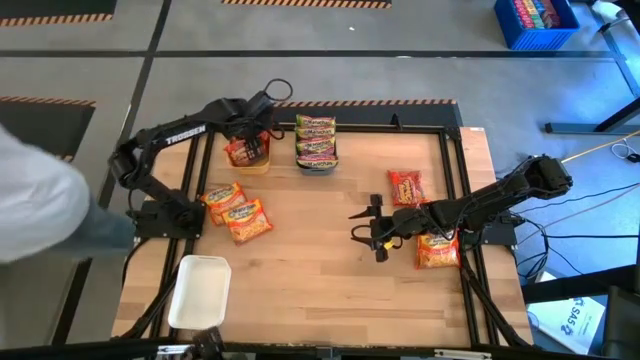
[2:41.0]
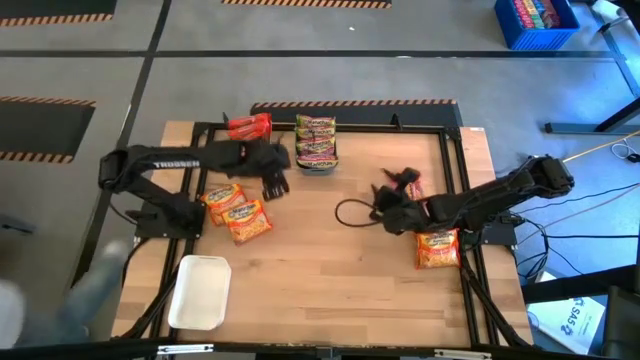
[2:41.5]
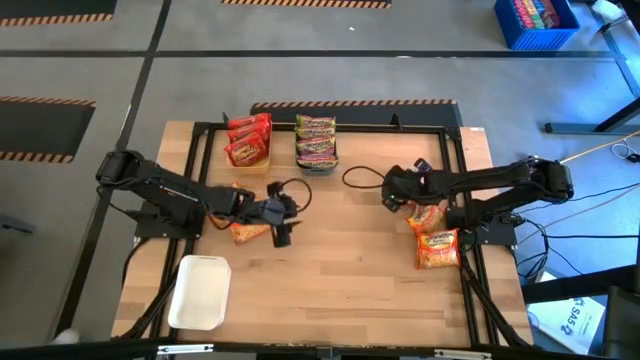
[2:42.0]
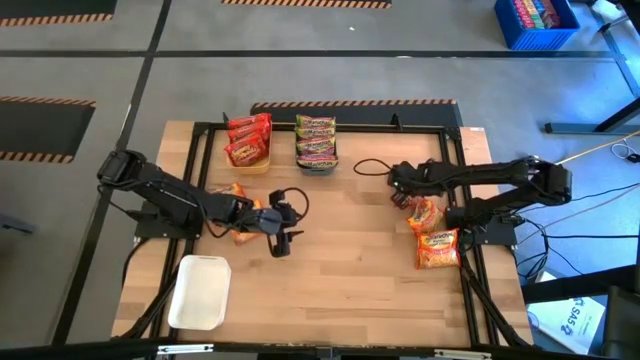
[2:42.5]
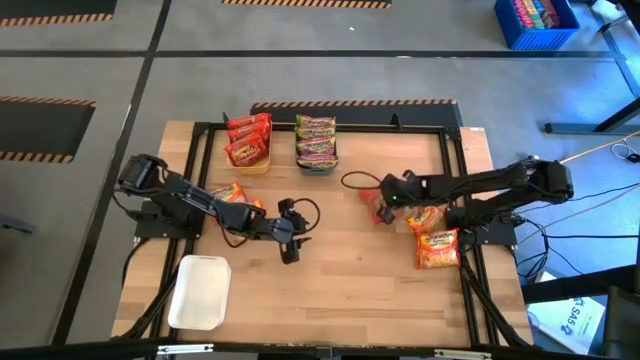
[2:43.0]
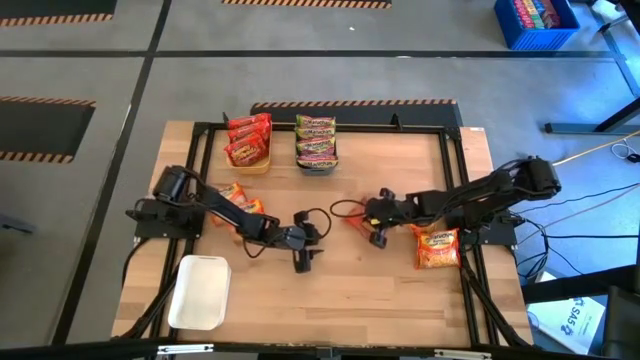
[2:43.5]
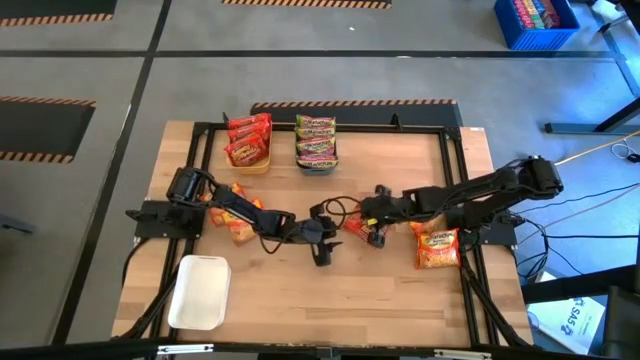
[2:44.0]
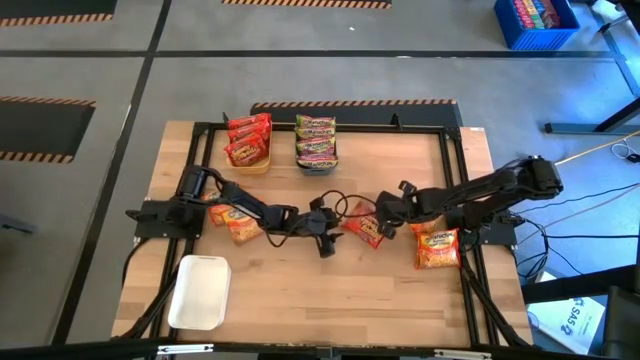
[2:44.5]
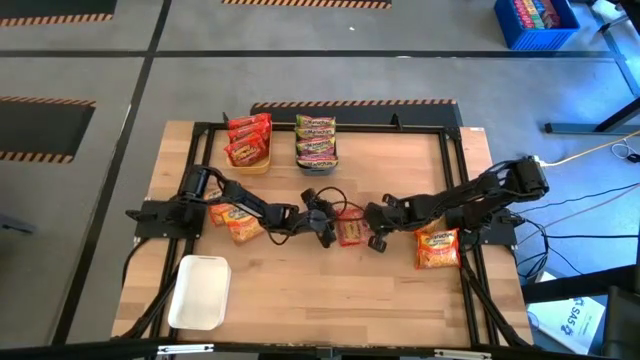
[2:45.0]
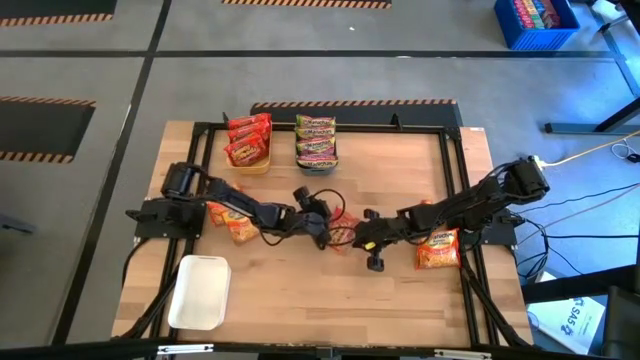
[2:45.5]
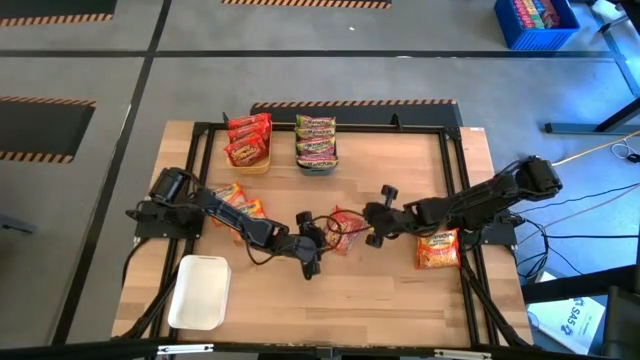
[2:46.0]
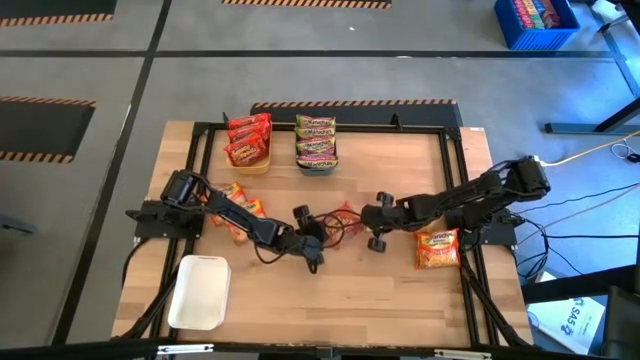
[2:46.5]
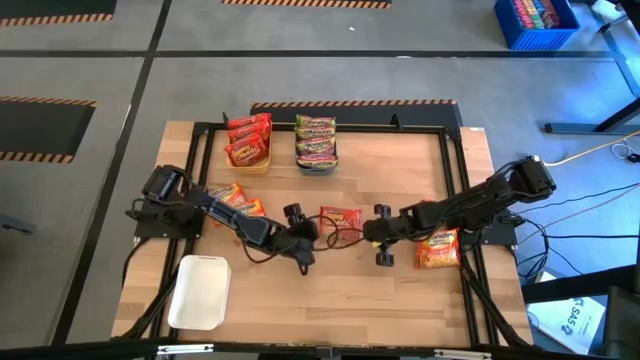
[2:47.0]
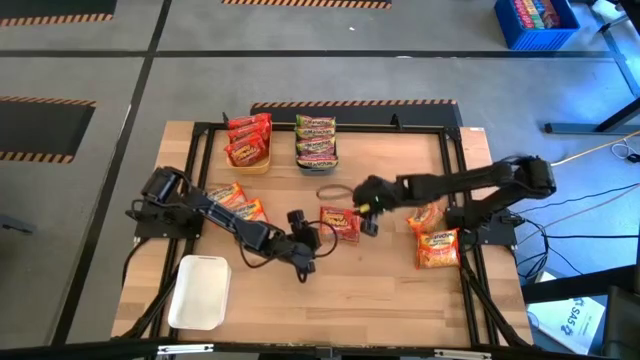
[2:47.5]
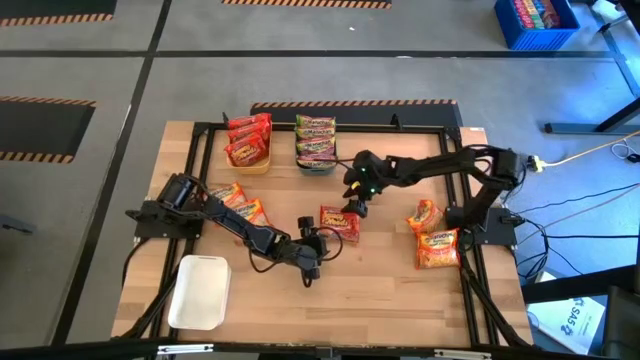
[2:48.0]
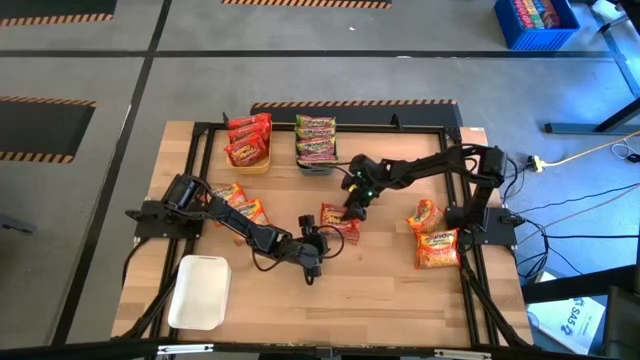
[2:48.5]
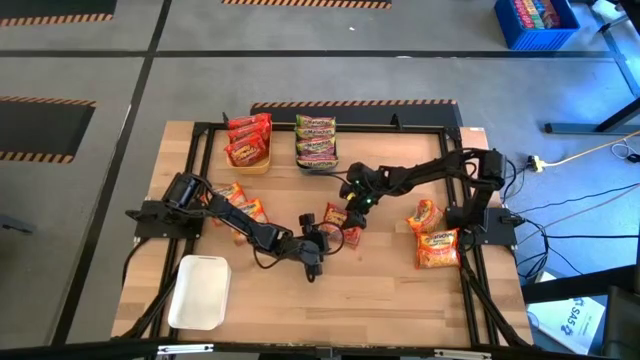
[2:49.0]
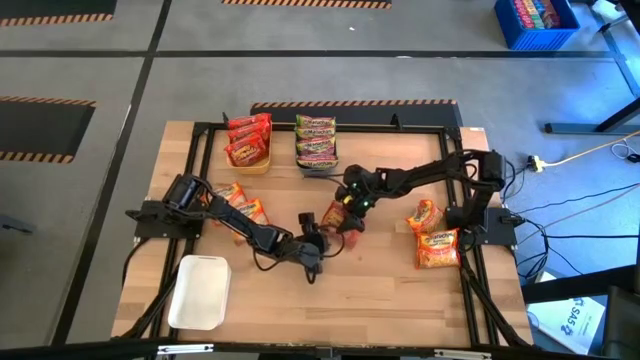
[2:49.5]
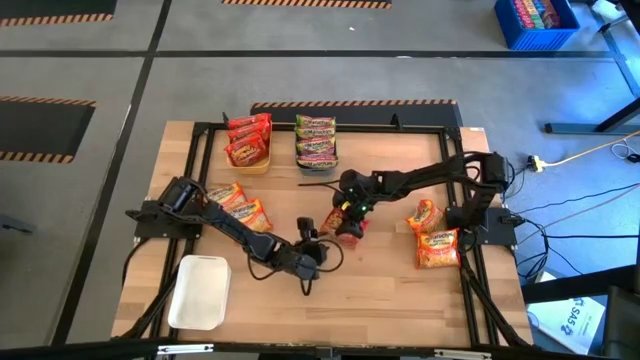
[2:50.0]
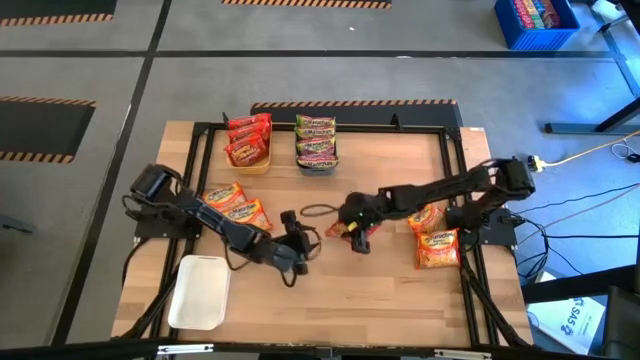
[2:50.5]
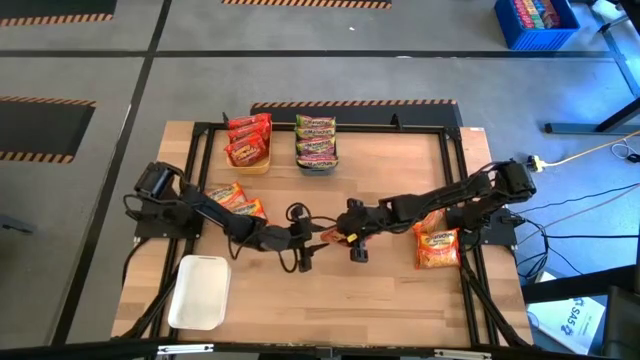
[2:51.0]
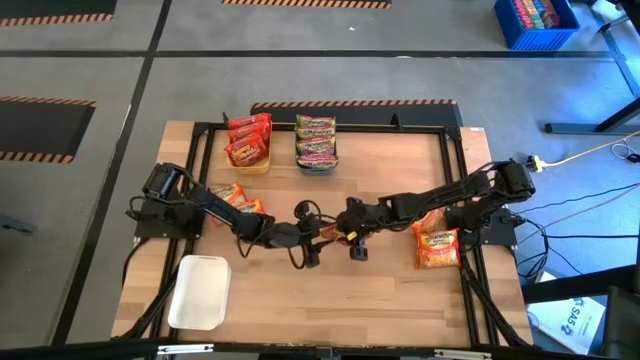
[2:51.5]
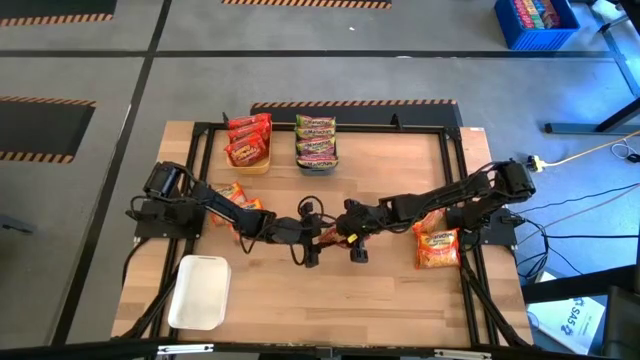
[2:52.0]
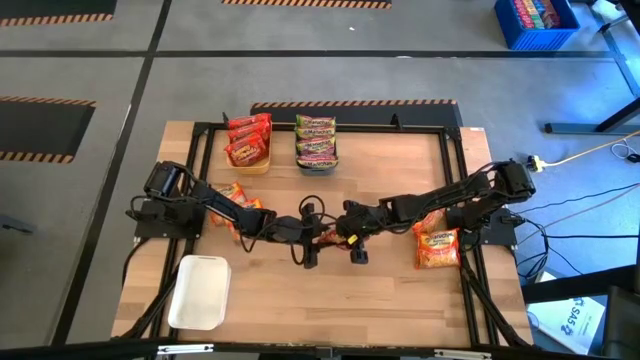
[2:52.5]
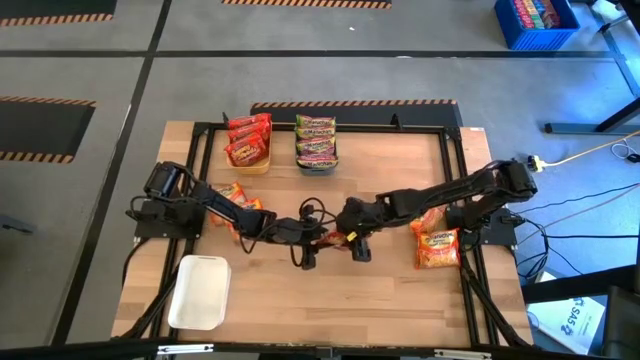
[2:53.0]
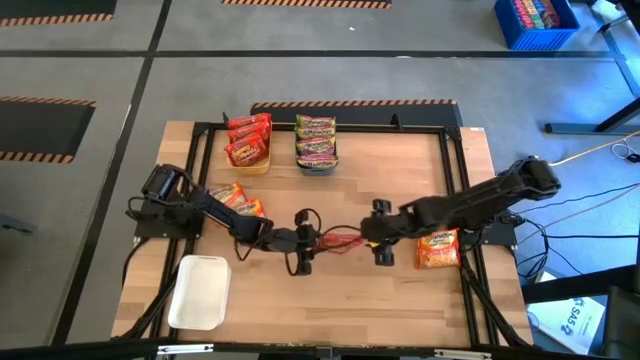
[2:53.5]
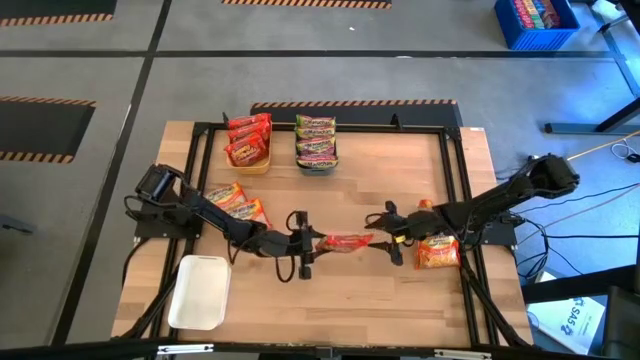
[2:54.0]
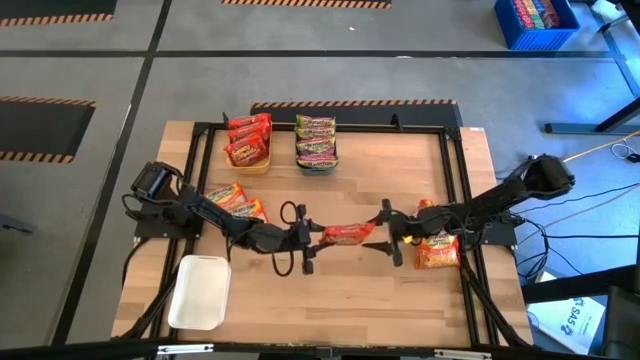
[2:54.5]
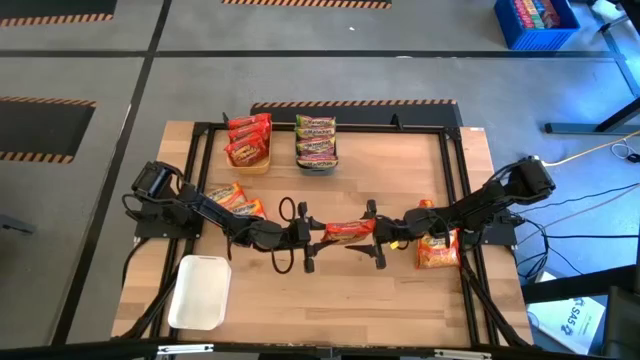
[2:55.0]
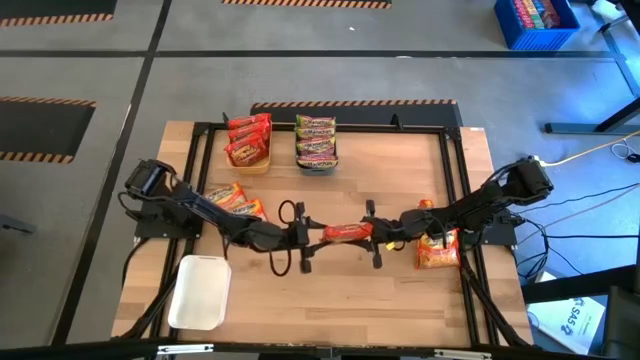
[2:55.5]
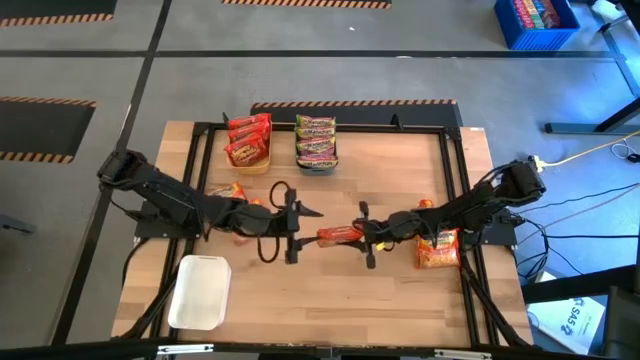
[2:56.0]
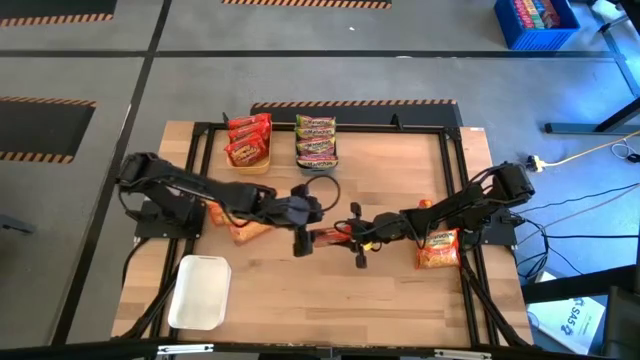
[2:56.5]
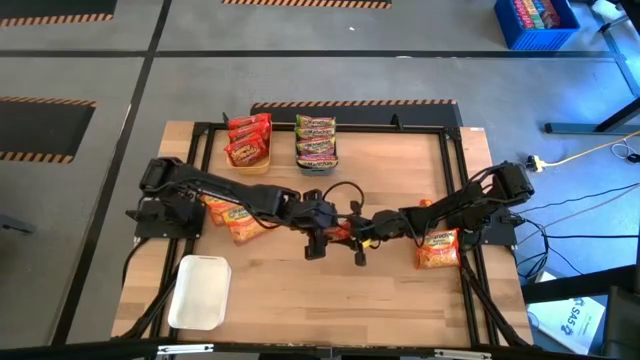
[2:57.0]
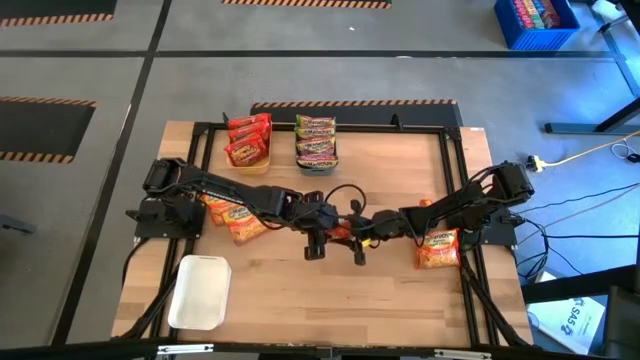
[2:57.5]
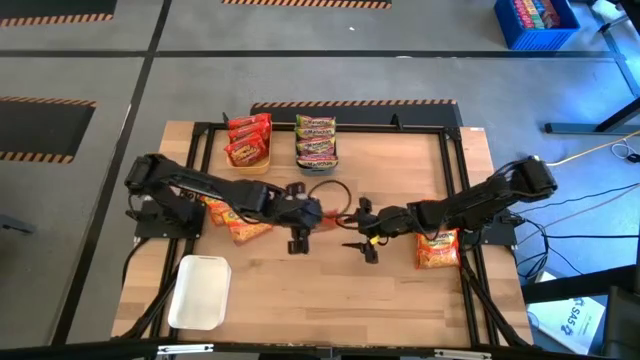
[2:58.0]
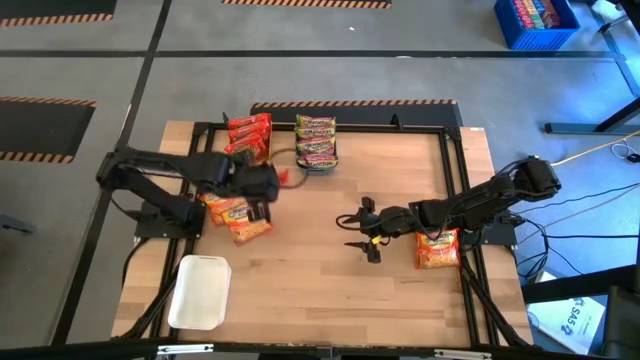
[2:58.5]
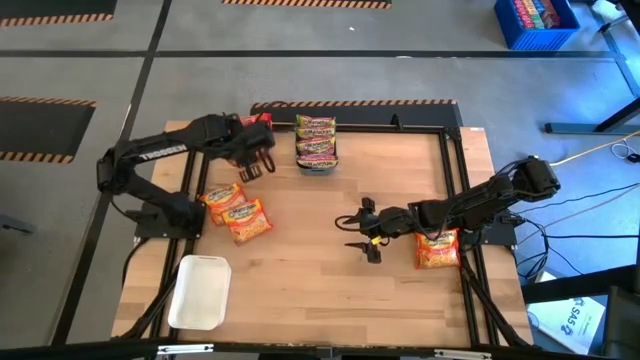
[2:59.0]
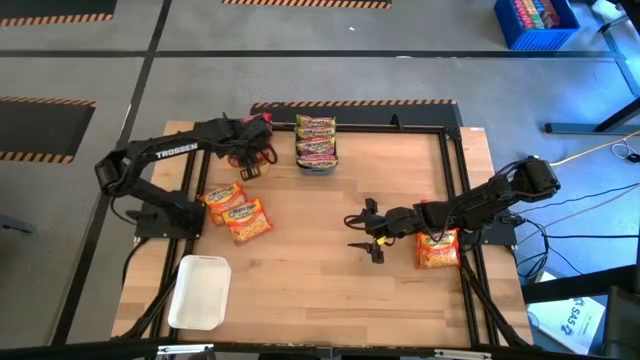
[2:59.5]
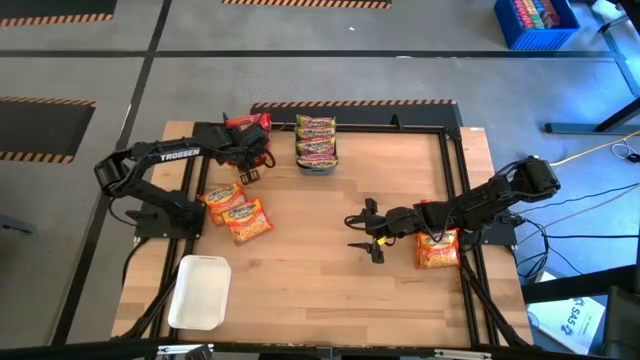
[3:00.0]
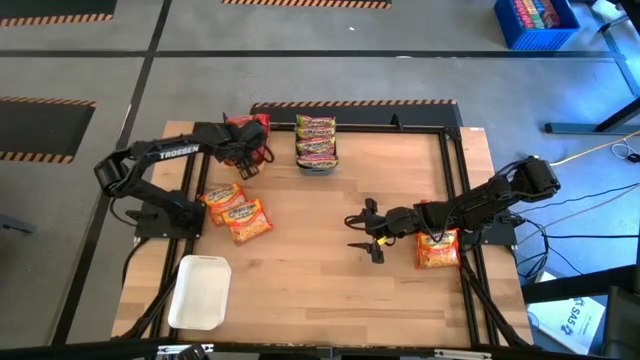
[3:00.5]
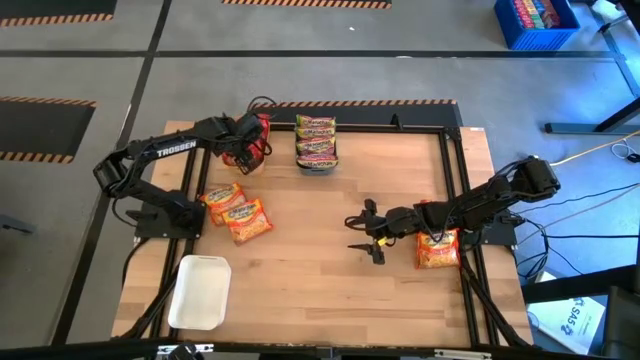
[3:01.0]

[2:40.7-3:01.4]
Task: Sort Maruchan noodles
Put the orange noodle pack into the yellow bin
